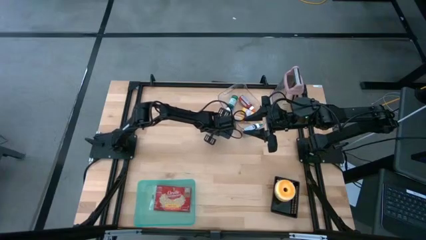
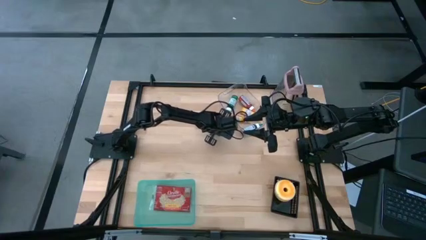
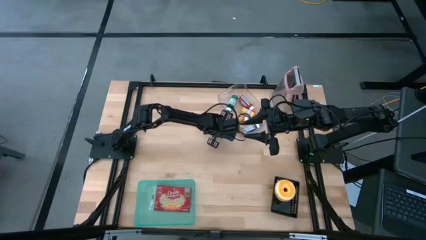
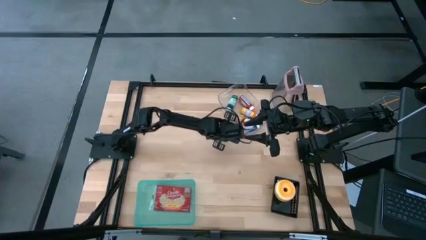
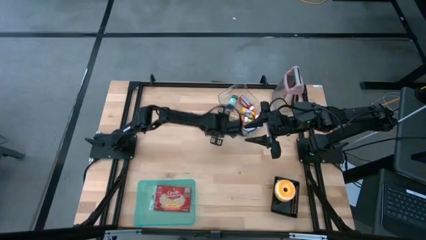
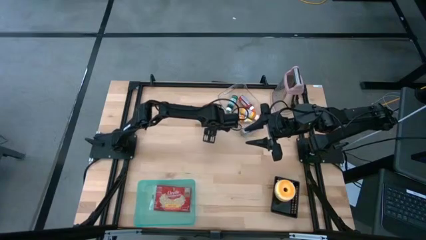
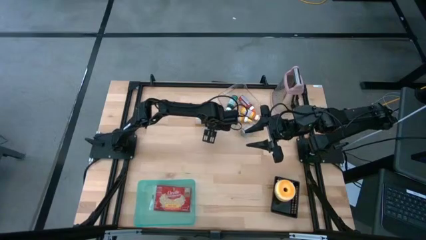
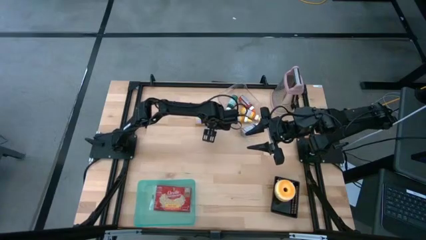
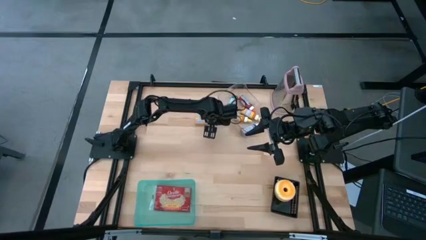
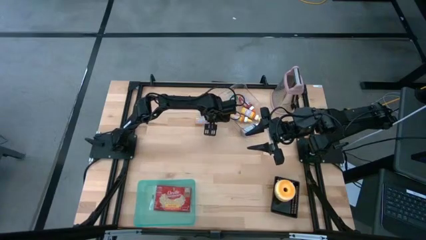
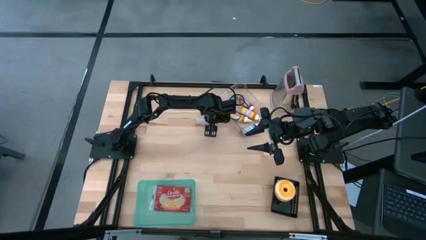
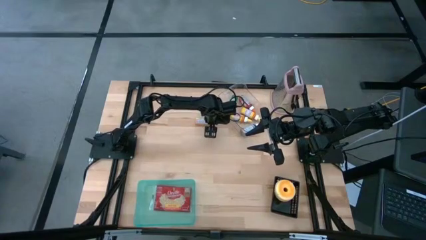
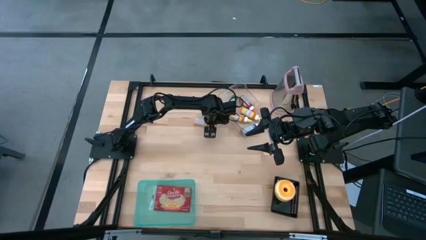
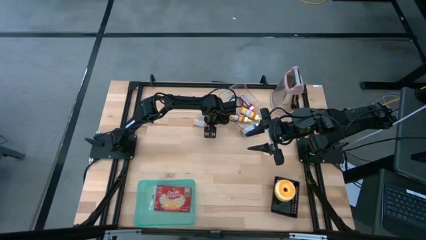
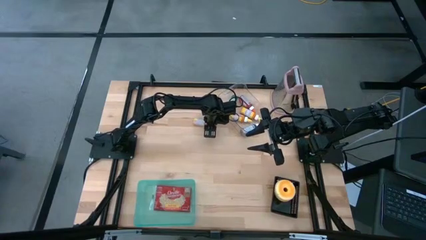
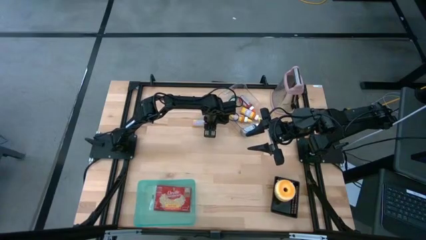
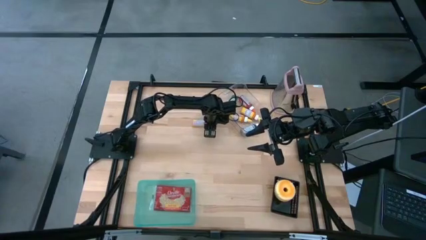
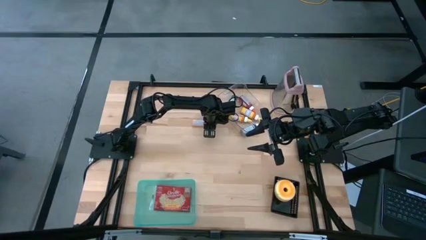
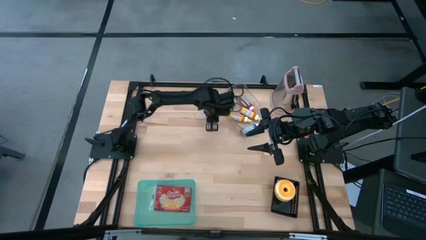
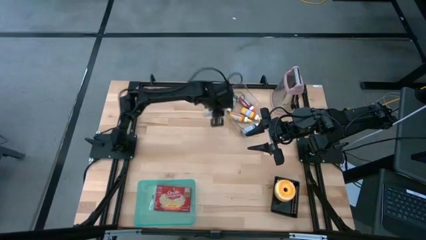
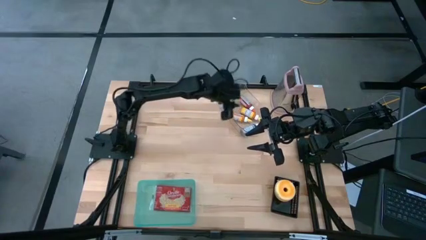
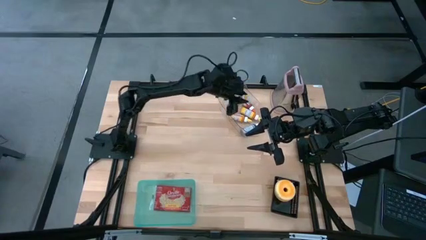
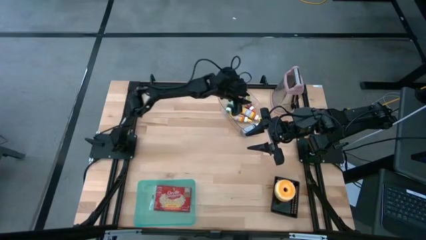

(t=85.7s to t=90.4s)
Task: Pick & Place Food Item
Put the orange food coloring into the transparent bin

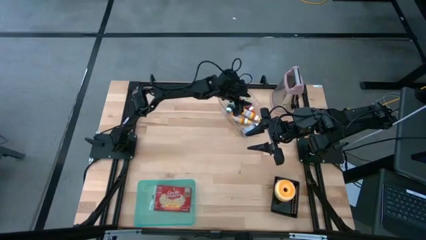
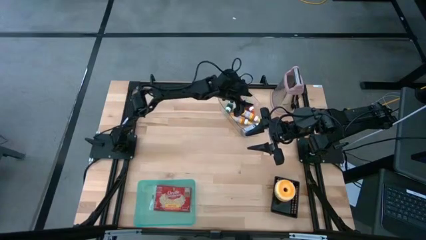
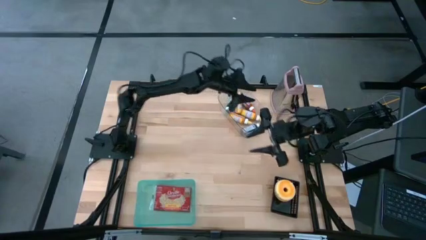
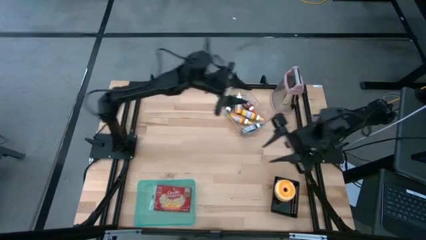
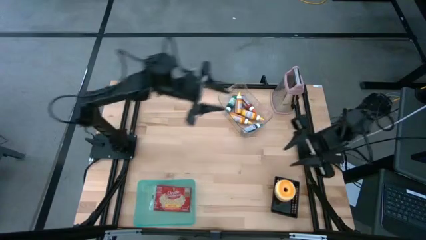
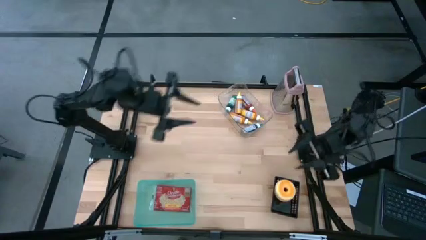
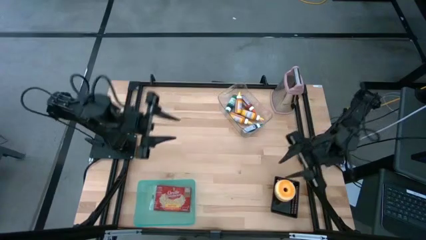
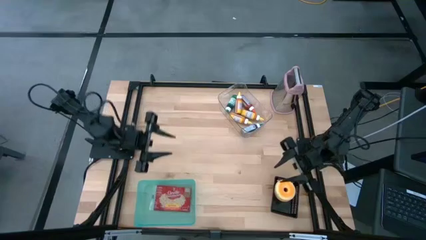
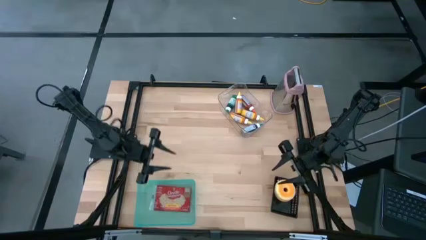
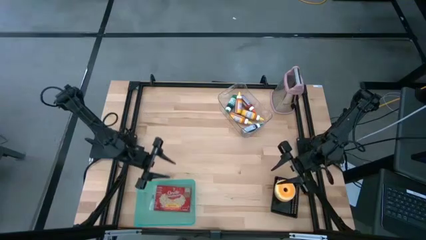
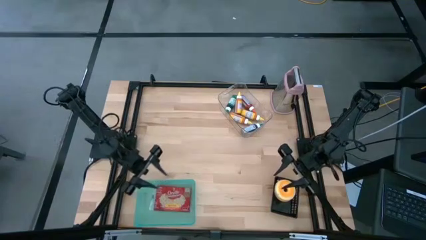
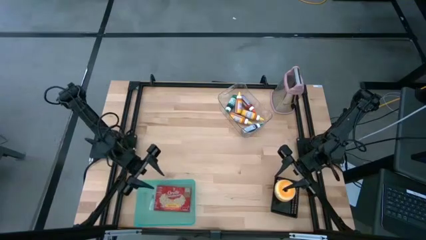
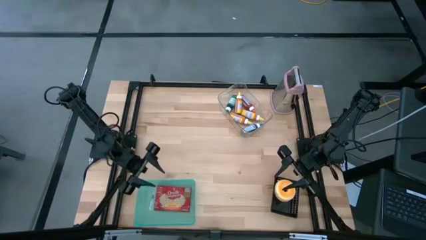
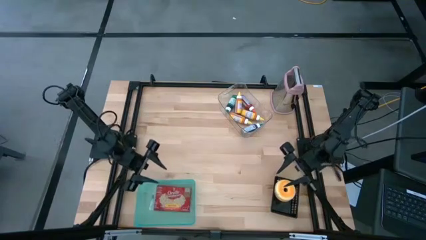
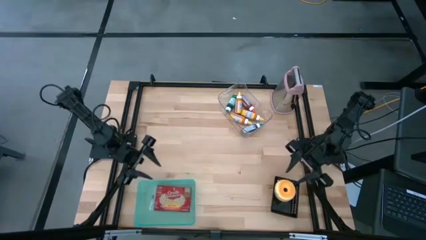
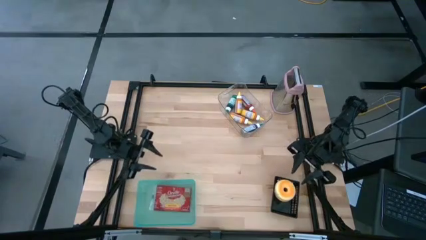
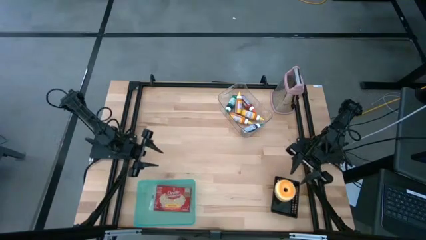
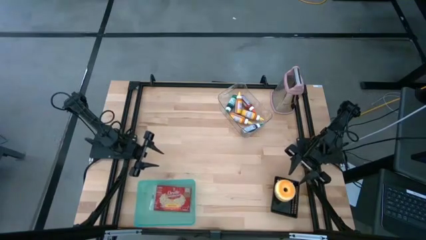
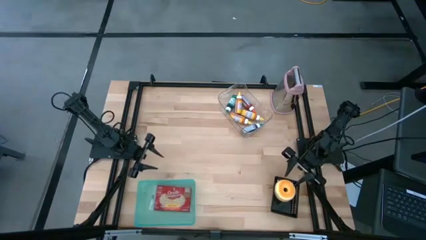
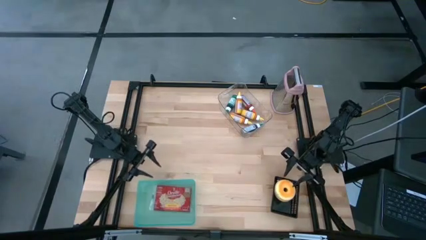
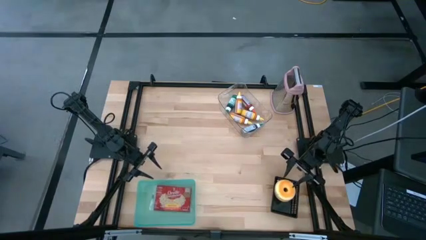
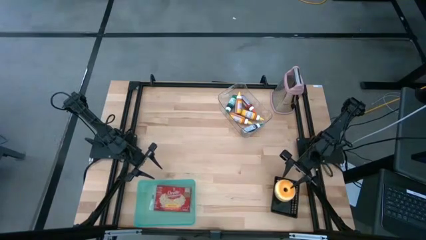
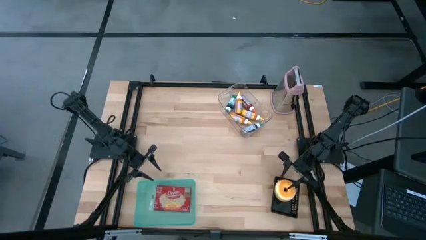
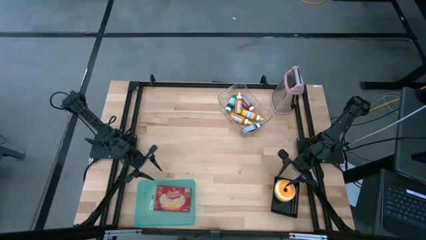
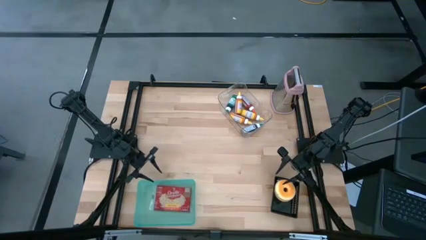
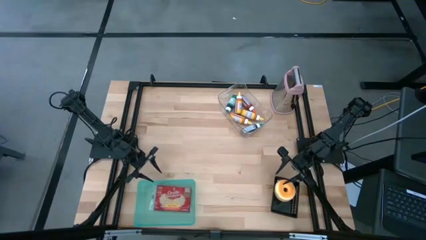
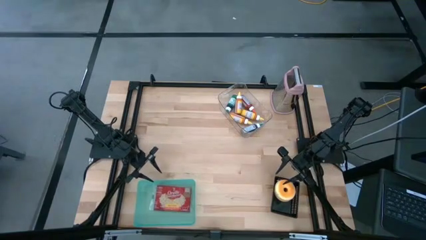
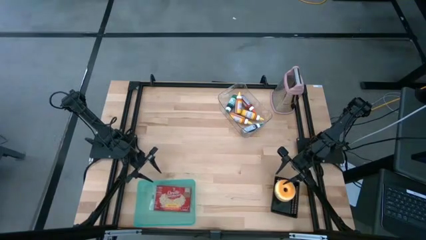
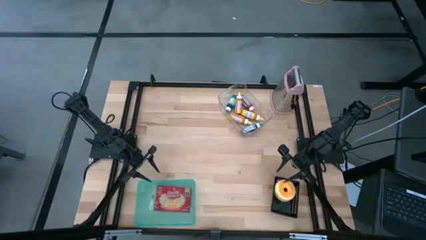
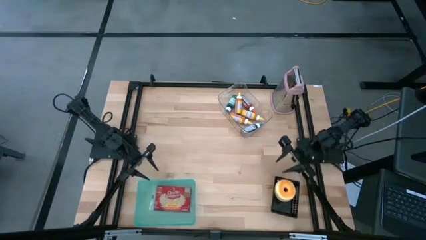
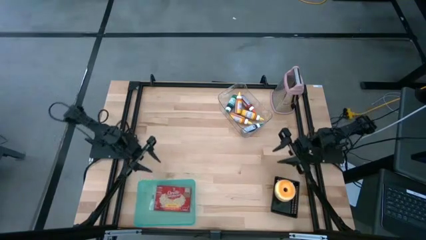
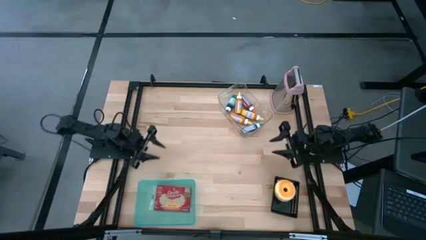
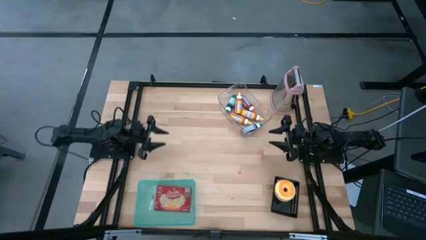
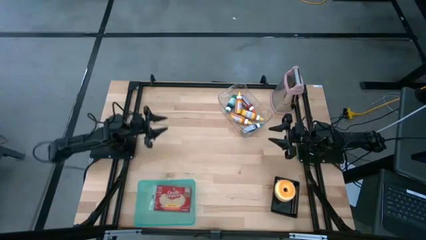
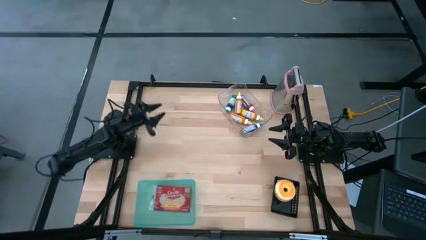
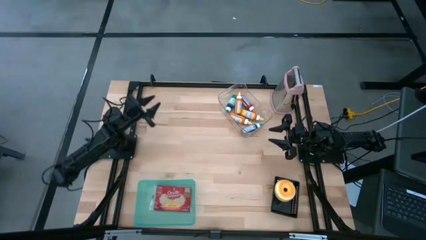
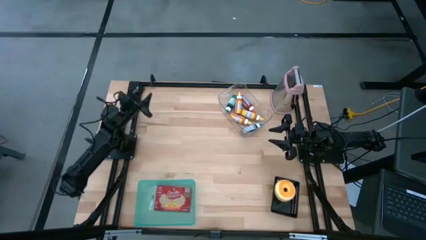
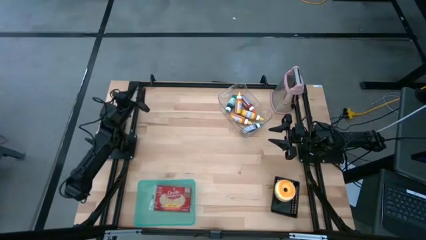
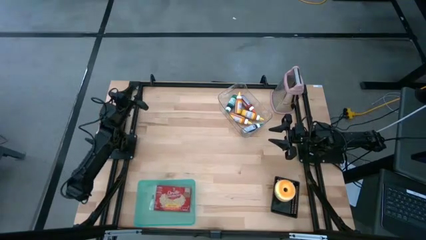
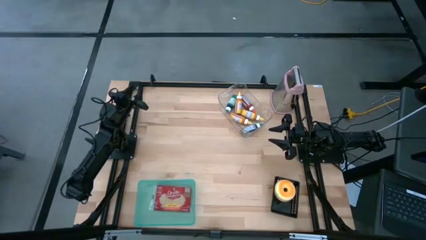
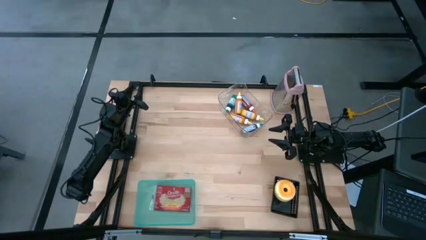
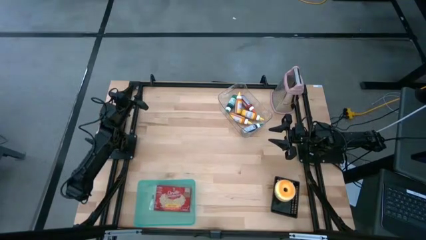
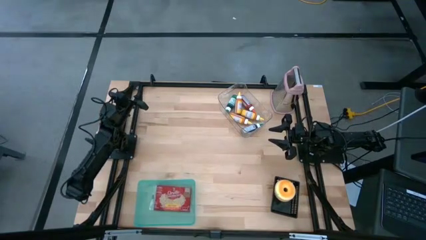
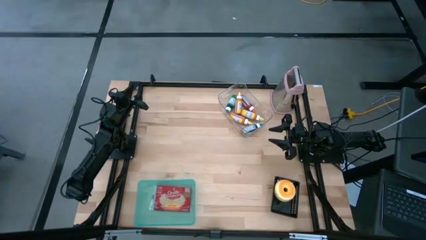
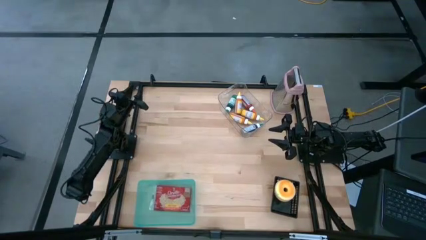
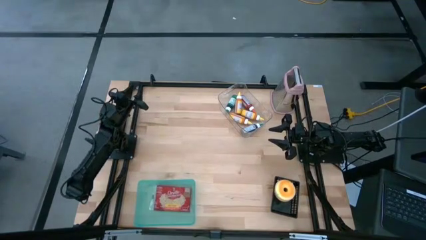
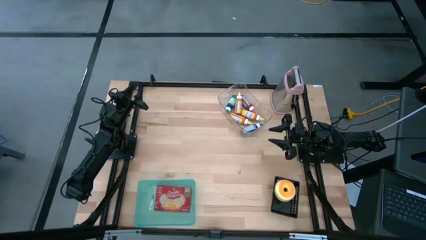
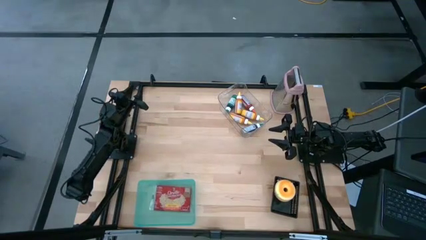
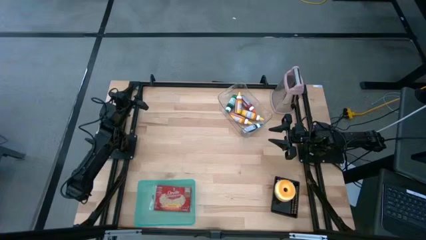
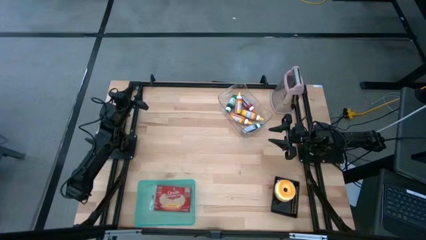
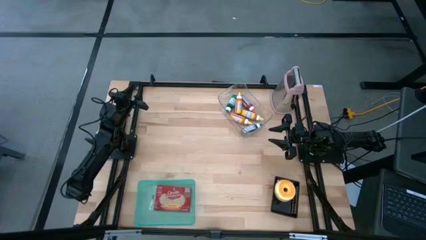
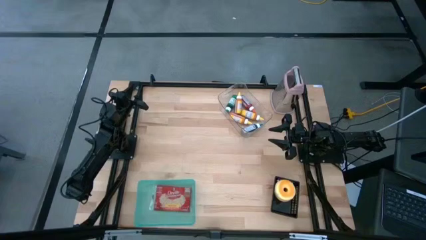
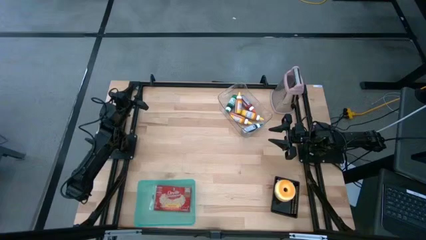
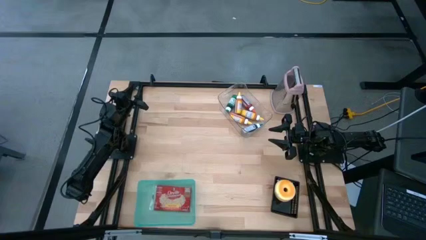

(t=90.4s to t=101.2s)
Return to Home Position

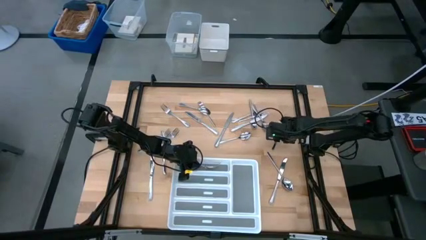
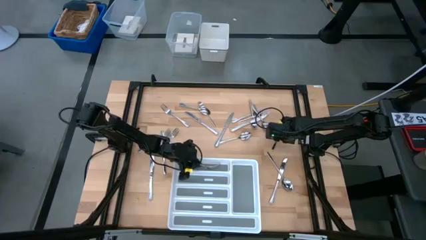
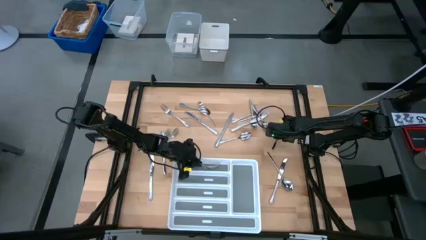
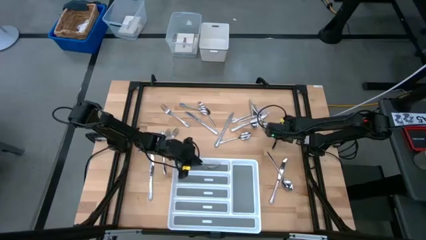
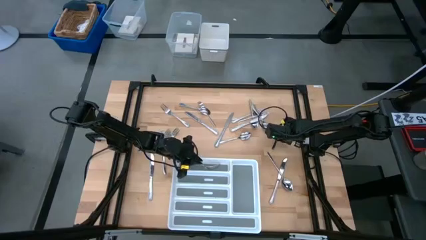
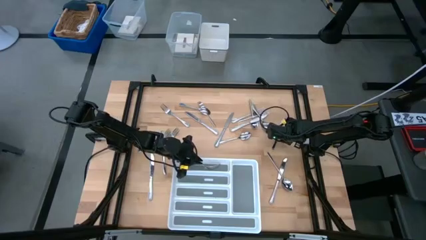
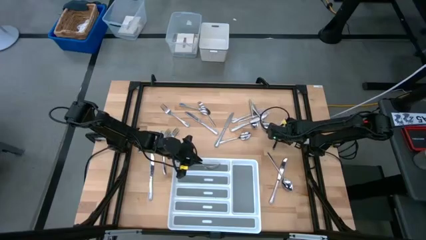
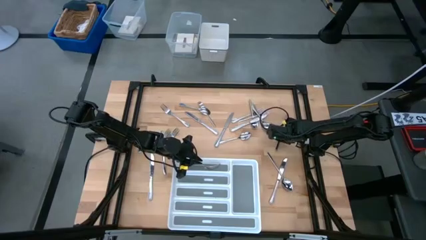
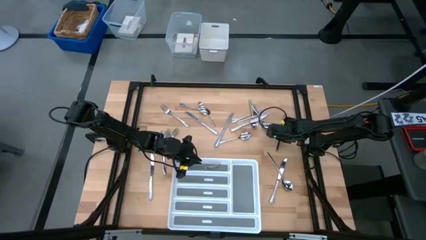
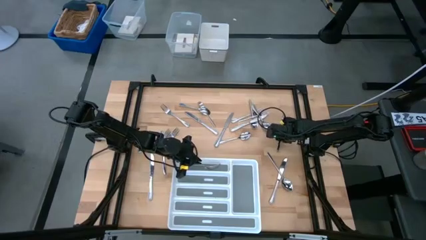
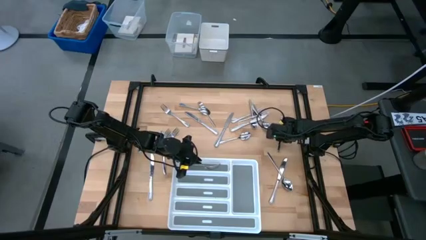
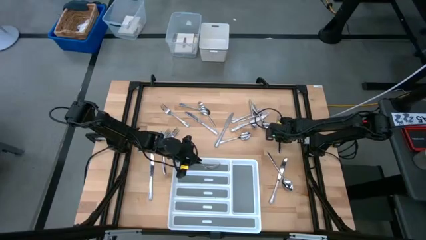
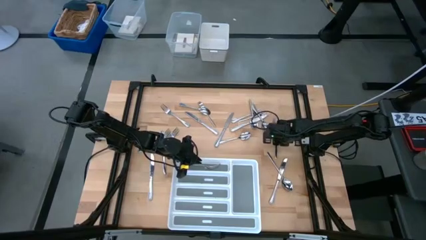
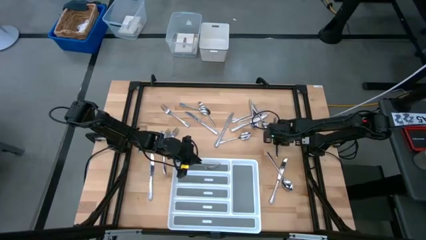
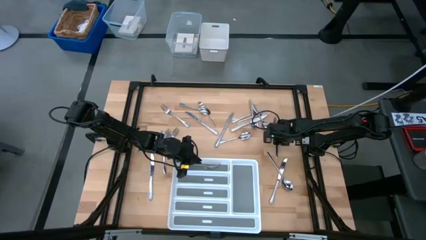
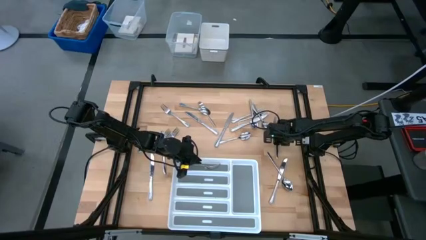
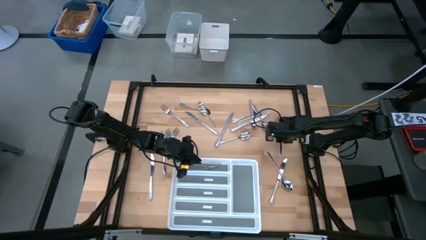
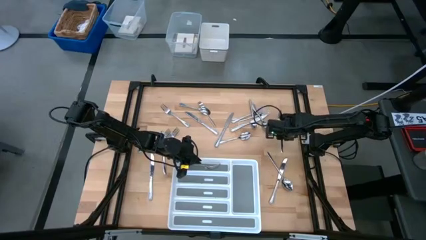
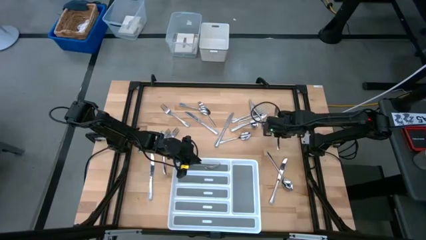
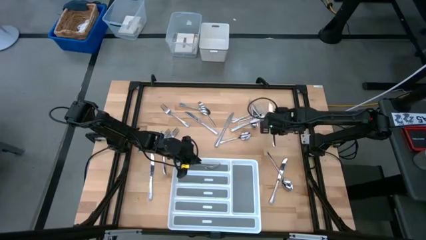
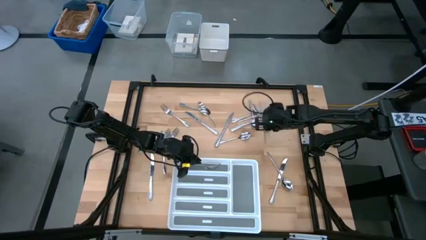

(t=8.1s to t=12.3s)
Task: Sort silverware
Put the silver knife into the top section of the white silverware tray
